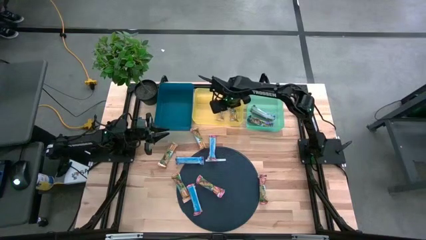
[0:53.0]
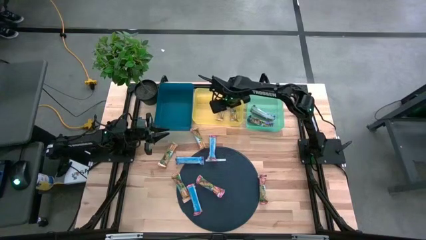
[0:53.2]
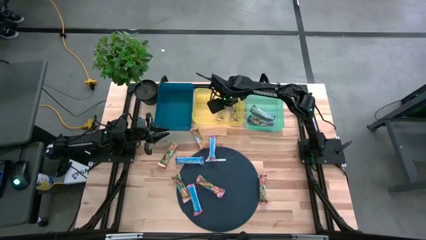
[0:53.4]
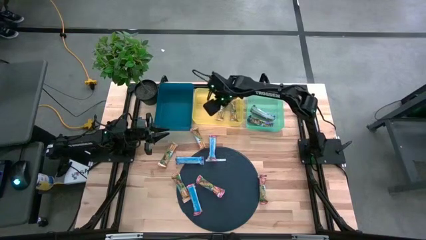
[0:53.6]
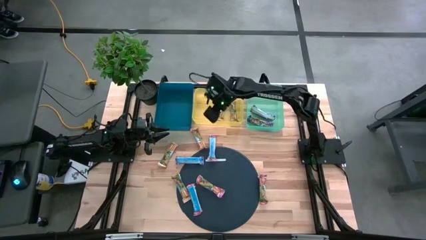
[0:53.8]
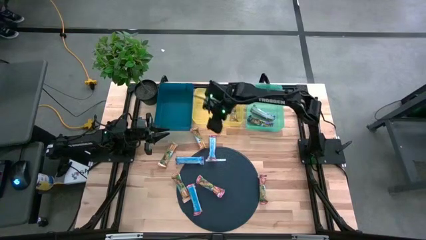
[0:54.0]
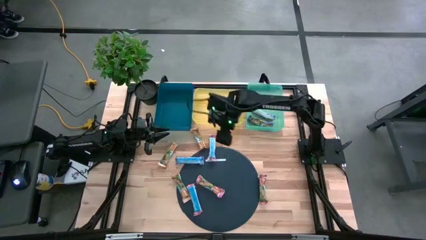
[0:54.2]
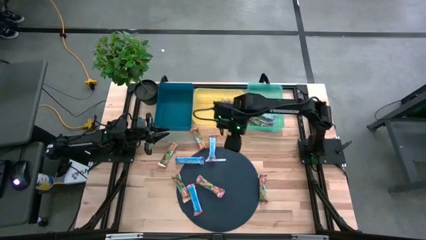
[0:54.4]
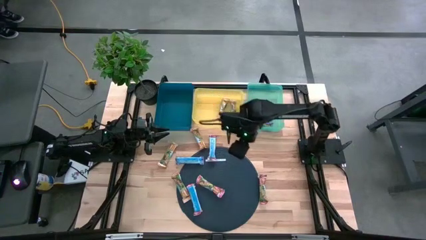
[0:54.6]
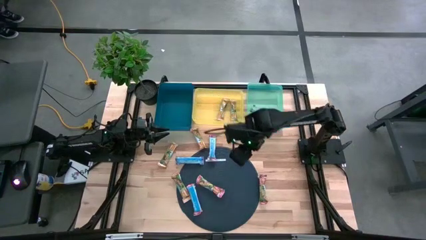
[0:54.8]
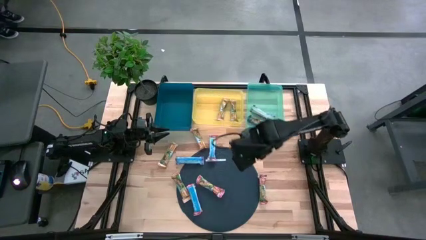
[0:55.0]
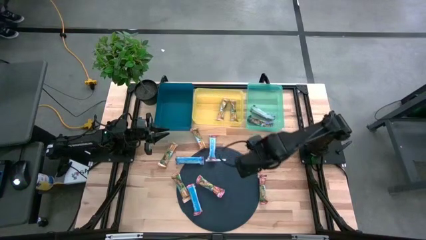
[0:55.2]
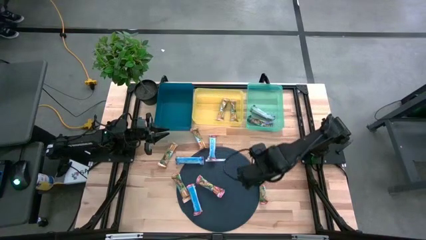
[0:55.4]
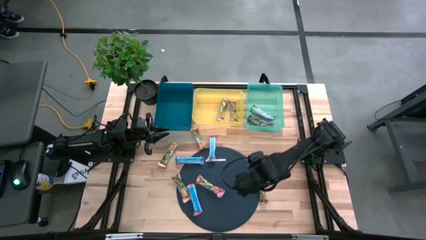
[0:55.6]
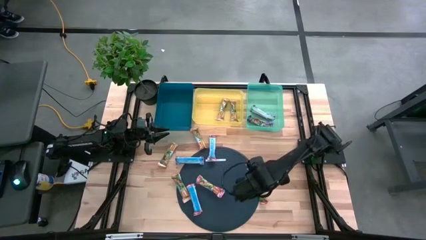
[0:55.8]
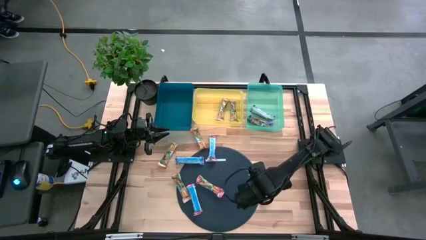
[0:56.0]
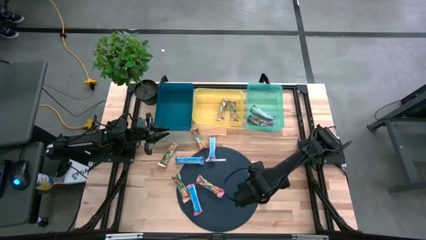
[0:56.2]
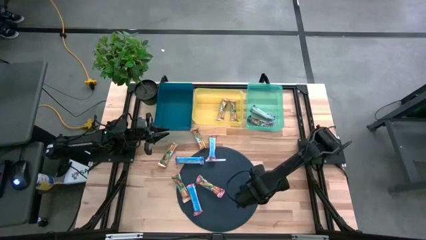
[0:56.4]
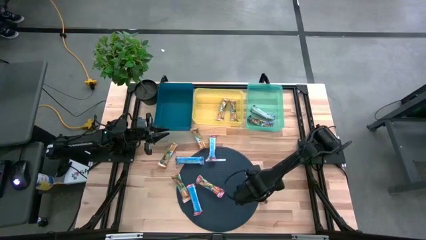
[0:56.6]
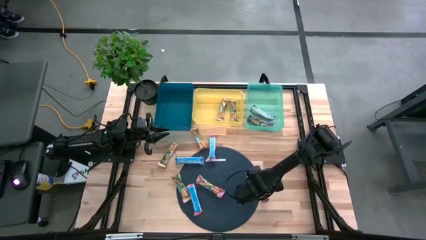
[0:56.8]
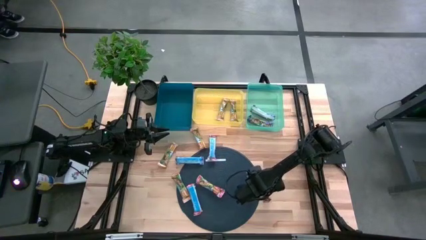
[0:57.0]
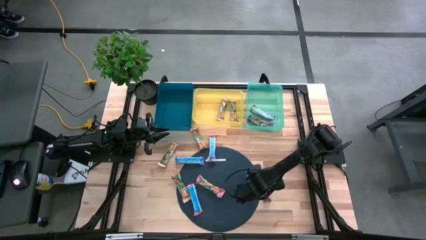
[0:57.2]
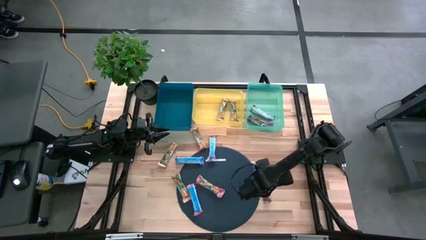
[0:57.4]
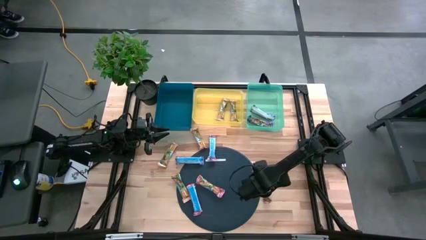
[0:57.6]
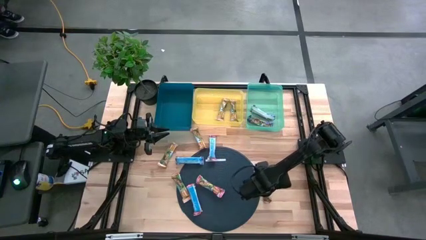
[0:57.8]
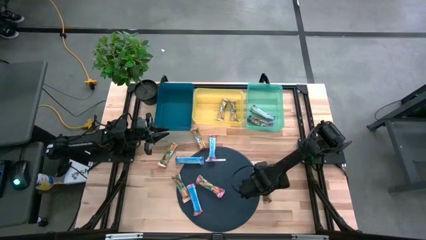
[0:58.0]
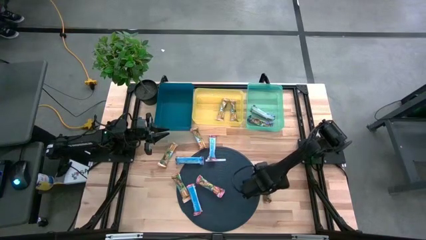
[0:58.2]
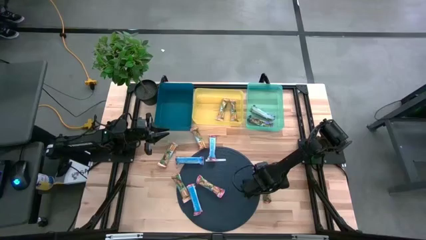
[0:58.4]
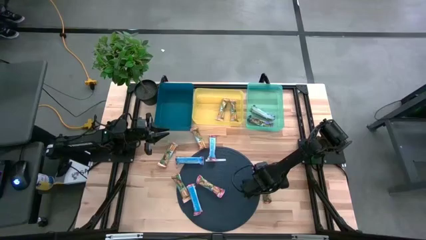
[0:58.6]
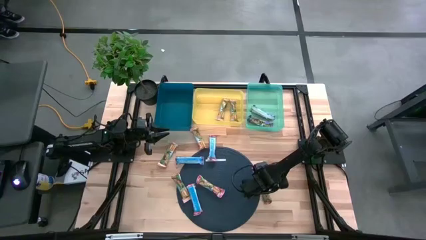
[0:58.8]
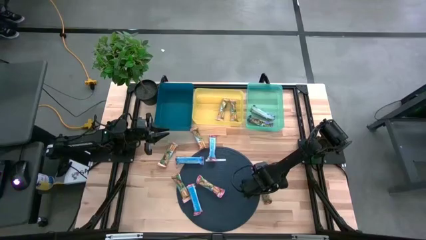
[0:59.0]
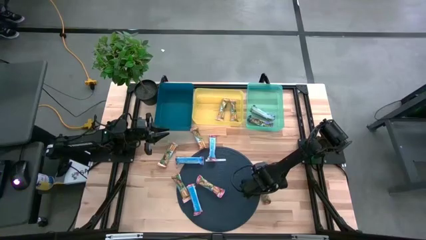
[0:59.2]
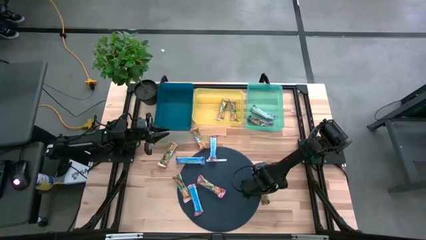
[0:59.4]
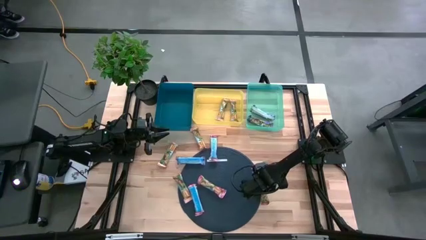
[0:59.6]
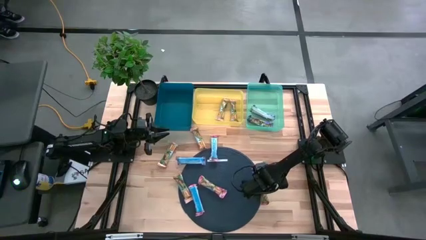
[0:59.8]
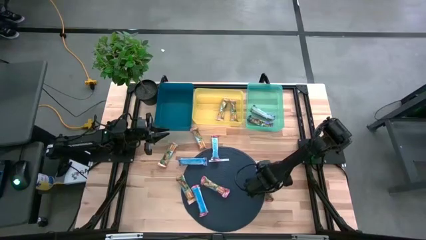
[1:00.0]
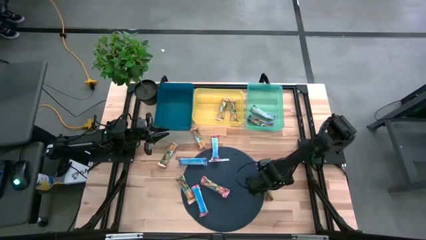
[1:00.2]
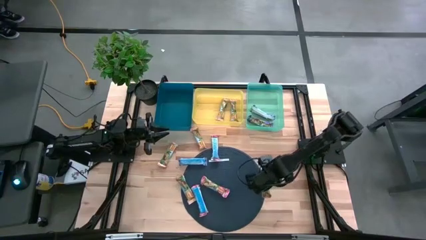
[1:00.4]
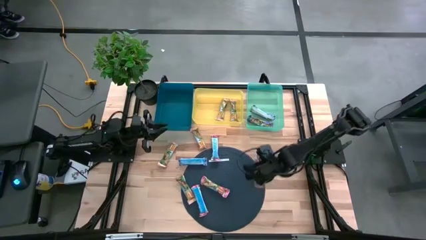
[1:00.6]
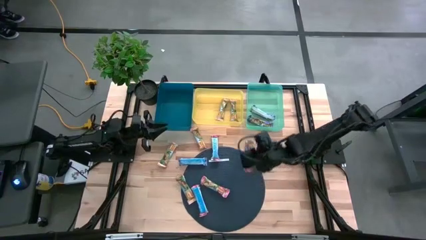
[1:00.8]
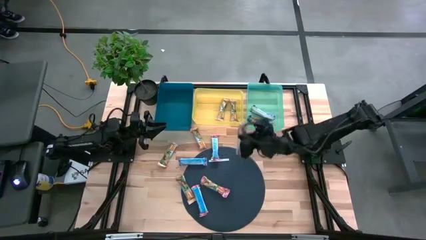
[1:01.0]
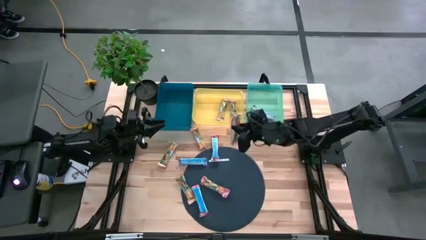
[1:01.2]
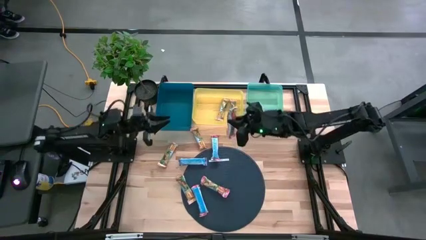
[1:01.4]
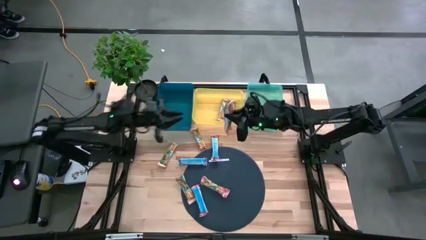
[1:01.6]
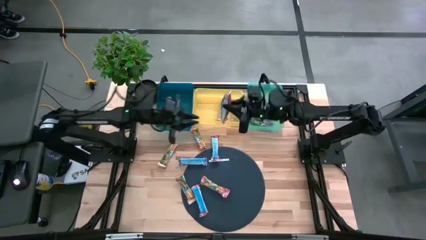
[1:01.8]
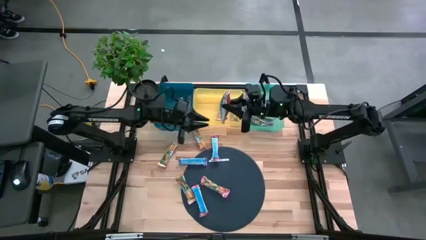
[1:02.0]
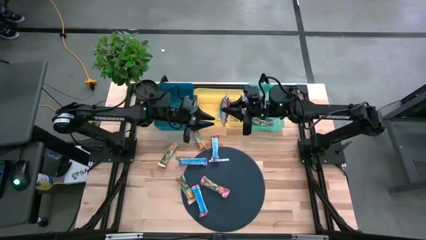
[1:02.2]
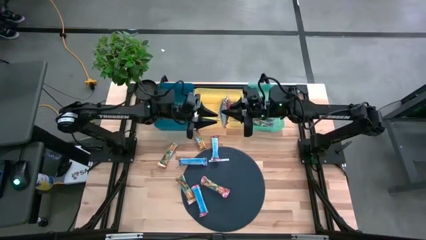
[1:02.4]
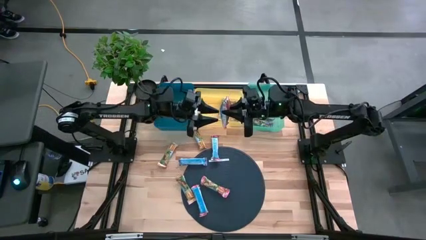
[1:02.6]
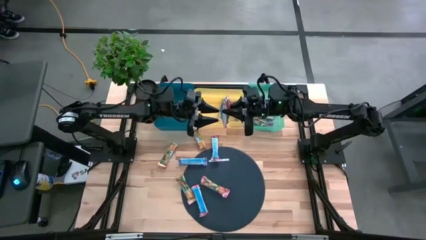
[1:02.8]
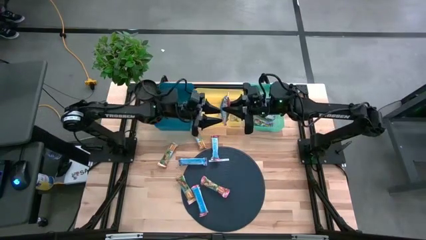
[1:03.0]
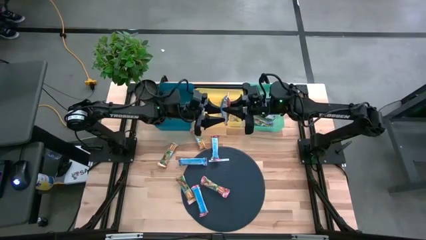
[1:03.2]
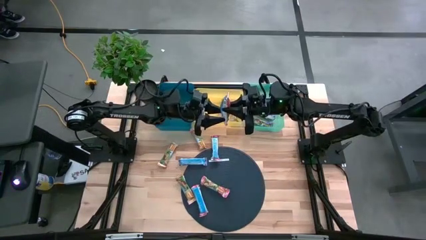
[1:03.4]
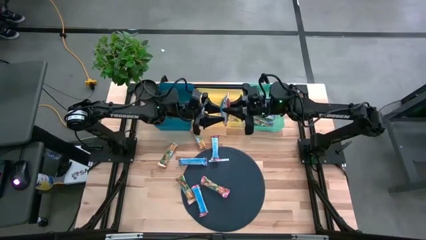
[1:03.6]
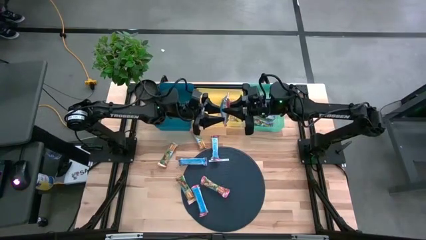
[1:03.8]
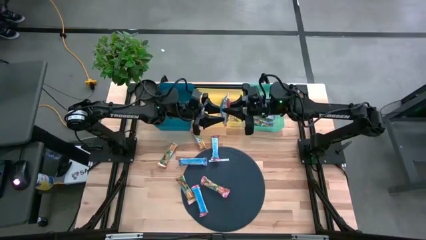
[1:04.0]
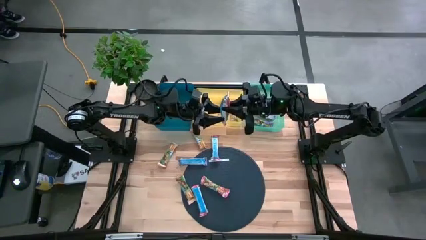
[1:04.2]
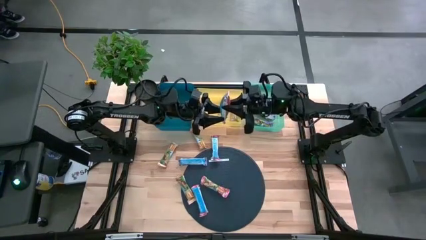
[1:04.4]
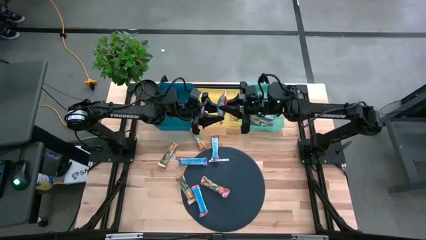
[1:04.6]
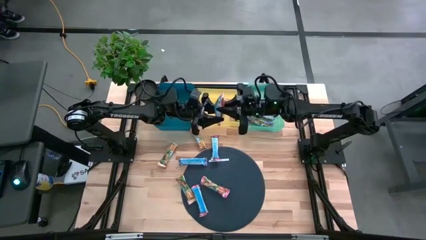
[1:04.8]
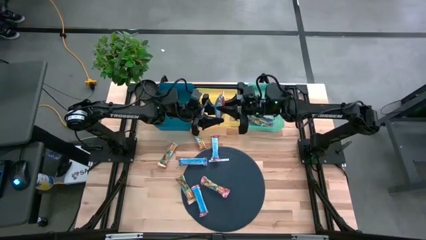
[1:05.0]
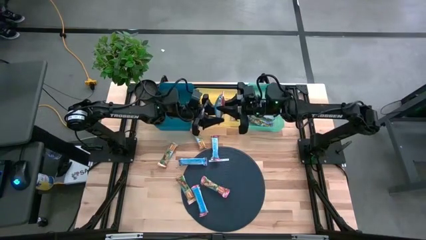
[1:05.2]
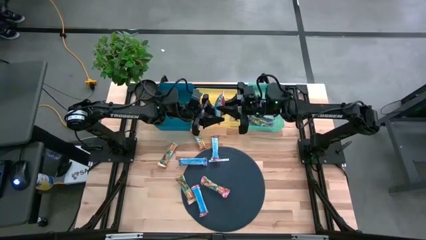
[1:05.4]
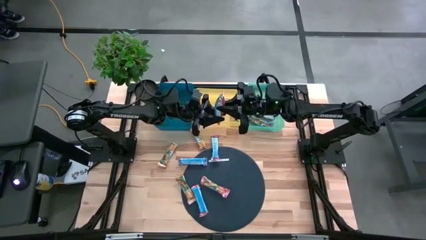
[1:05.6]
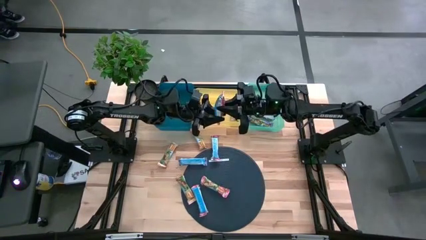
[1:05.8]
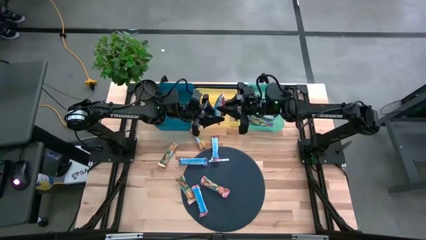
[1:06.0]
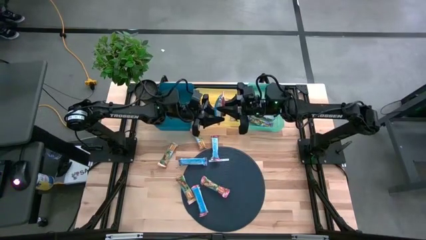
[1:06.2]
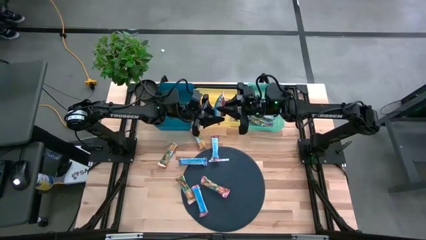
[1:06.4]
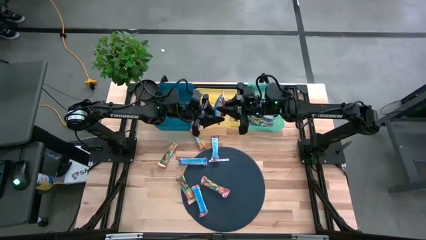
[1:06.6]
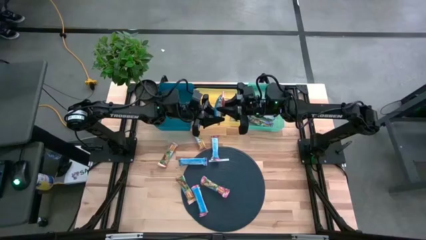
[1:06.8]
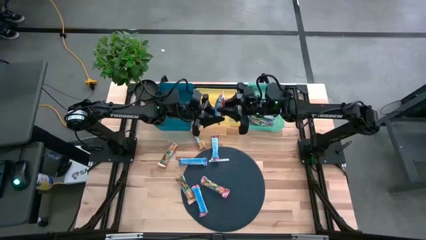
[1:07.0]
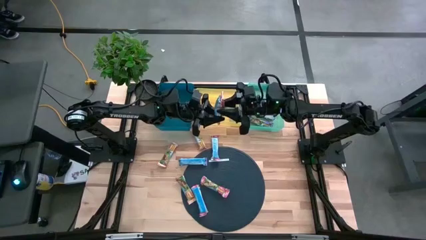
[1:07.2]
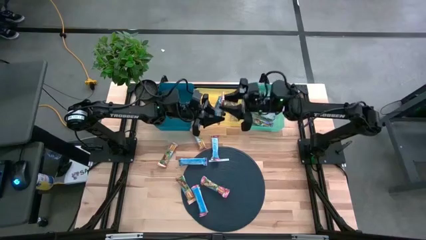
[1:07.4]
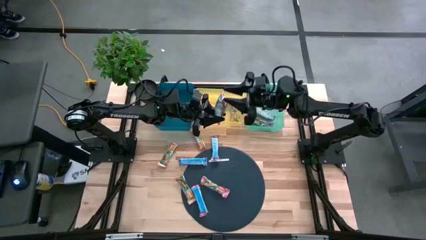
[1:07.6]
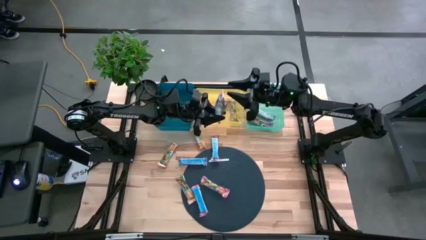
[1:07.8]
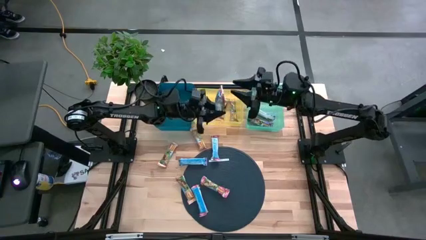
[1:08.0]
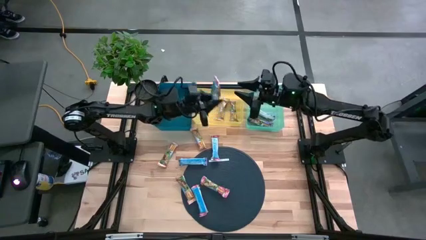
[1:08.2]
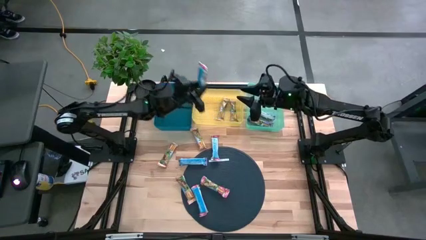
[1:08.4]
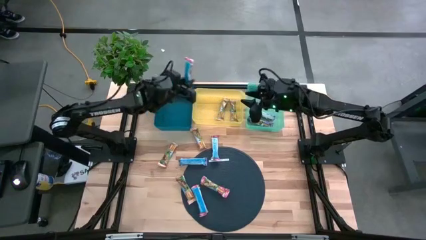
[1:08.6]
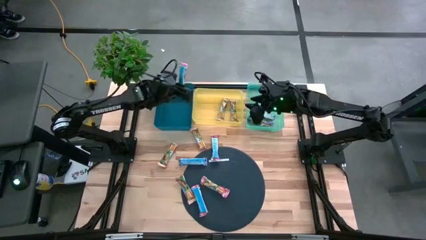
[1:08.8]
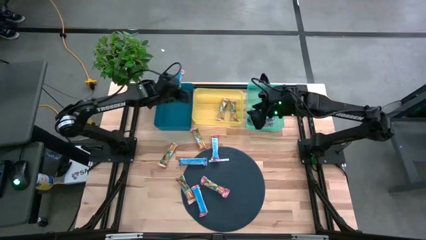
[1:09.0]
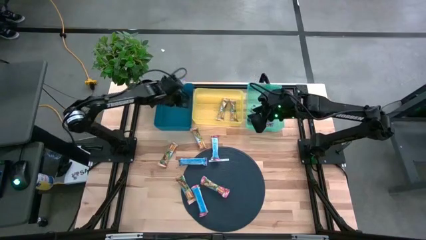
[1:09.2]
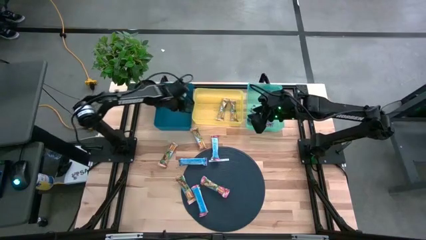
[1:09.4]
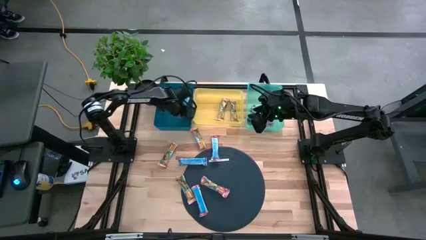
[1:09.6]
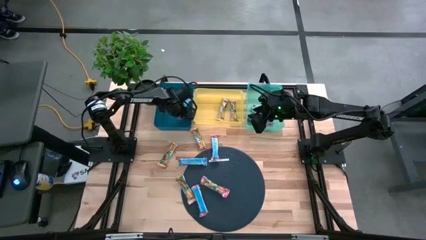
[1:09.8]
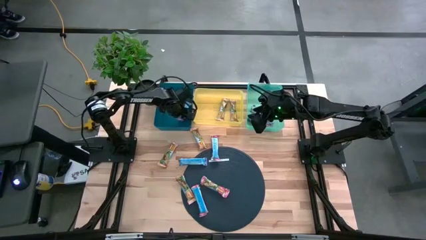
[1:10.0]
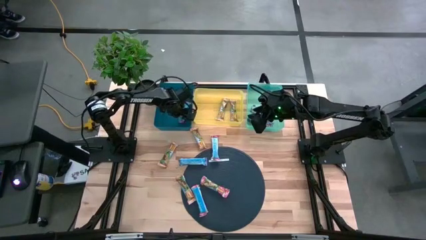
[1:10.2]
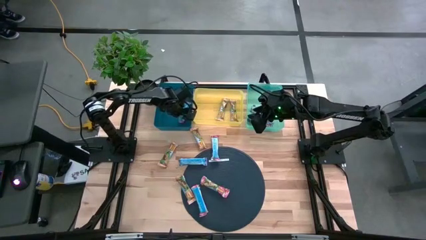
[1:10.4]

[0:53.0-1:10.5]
Task: Pick and place Granola Bars by type
Put the red granola bar into the blue bin
